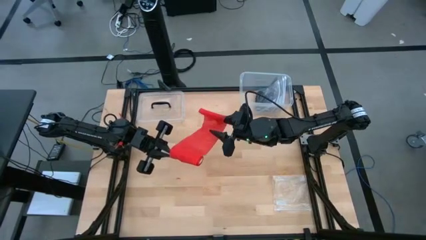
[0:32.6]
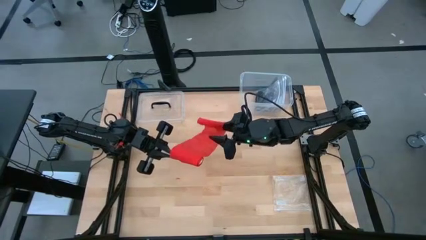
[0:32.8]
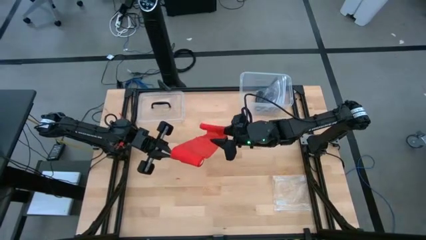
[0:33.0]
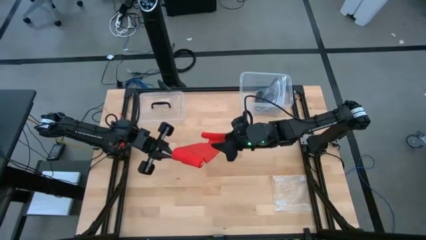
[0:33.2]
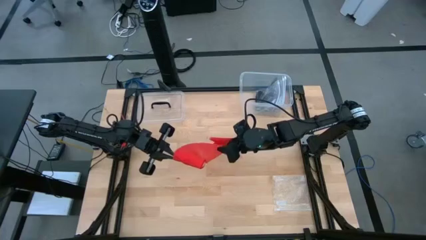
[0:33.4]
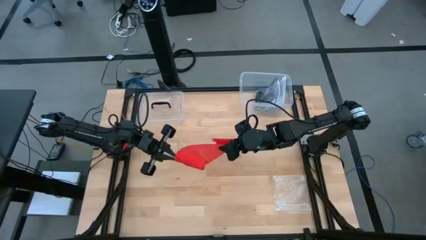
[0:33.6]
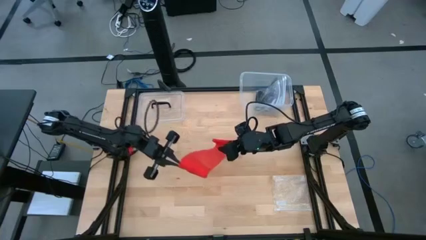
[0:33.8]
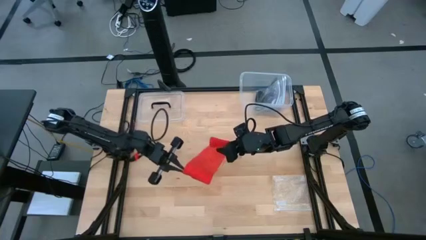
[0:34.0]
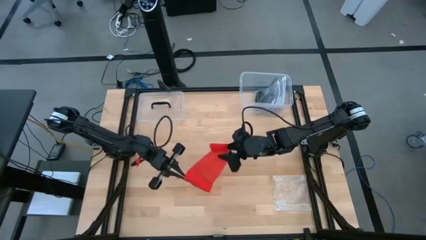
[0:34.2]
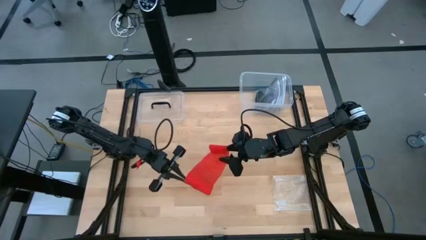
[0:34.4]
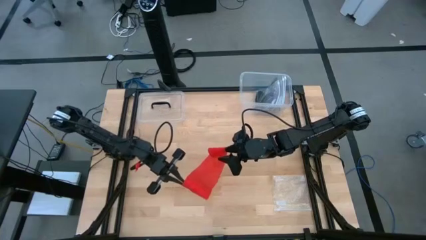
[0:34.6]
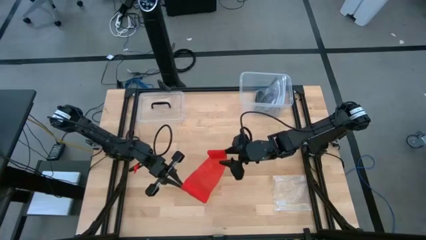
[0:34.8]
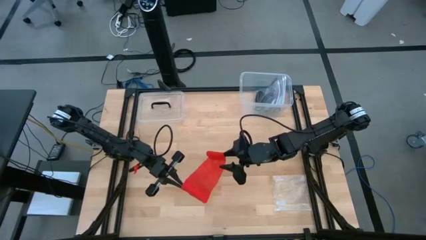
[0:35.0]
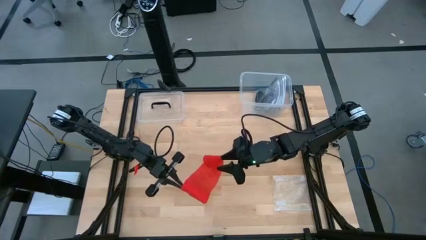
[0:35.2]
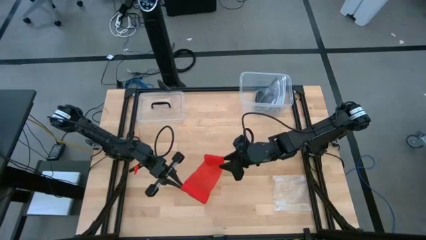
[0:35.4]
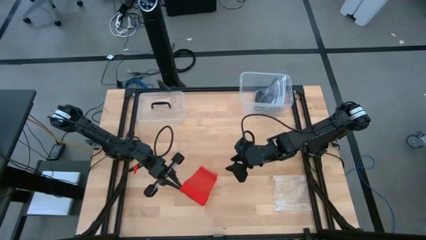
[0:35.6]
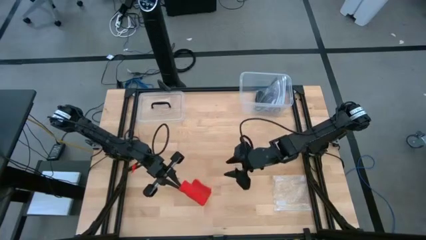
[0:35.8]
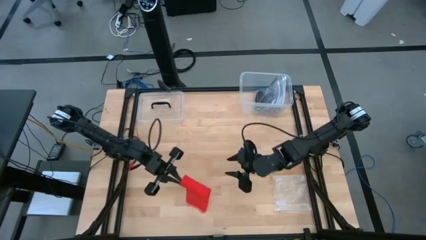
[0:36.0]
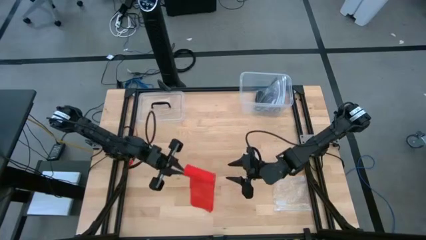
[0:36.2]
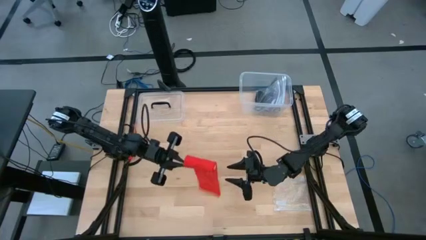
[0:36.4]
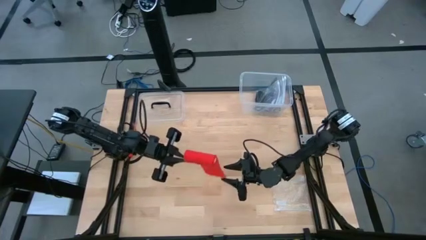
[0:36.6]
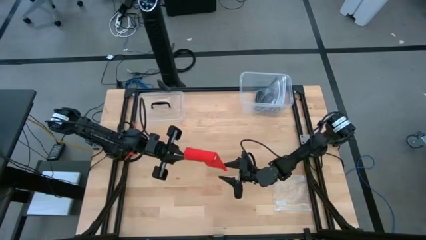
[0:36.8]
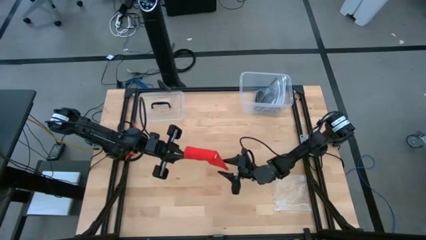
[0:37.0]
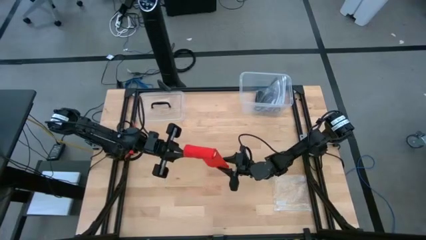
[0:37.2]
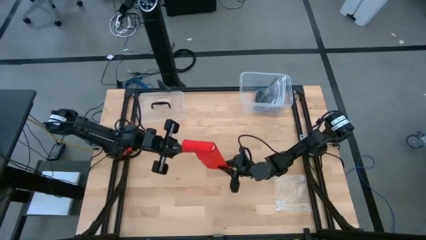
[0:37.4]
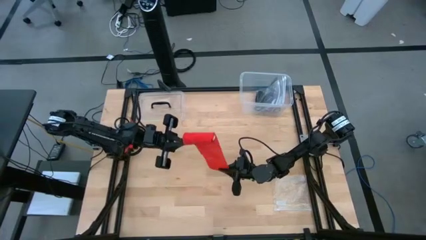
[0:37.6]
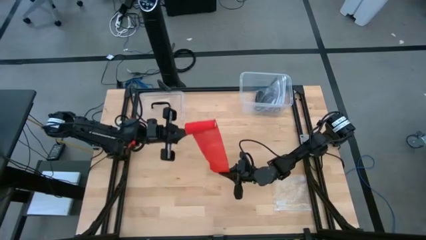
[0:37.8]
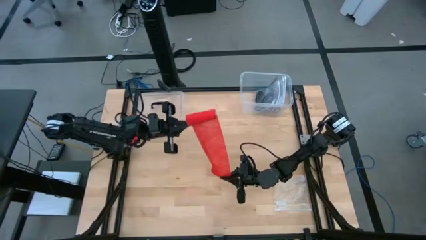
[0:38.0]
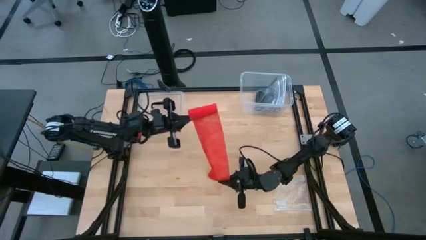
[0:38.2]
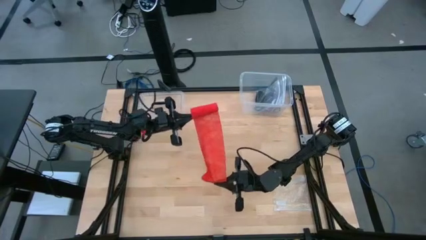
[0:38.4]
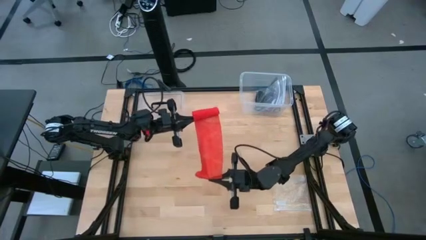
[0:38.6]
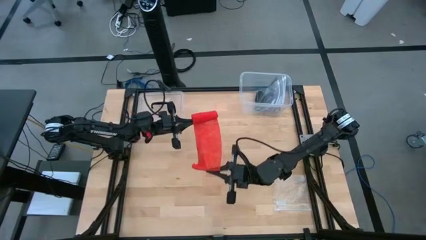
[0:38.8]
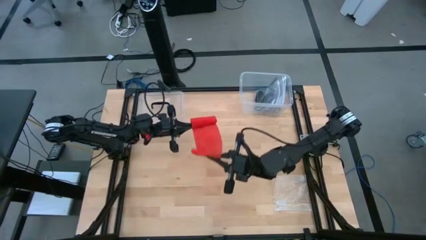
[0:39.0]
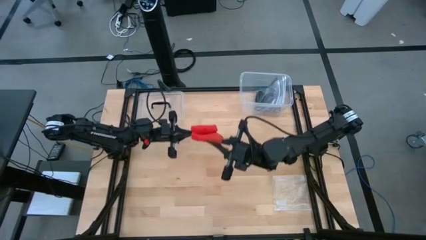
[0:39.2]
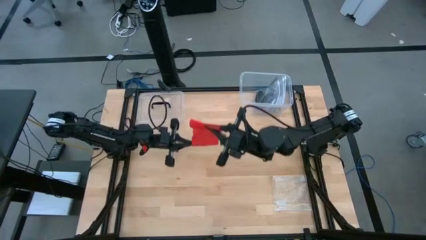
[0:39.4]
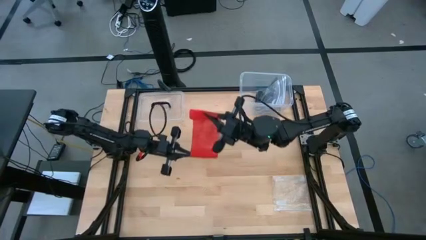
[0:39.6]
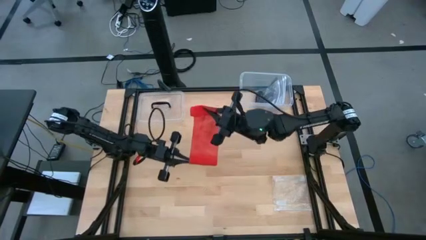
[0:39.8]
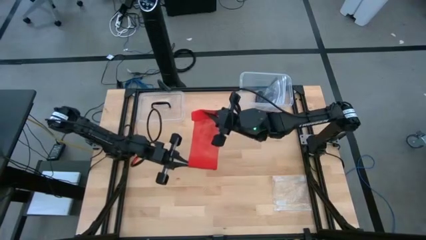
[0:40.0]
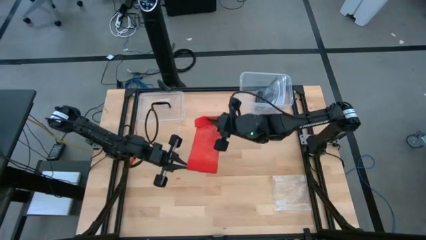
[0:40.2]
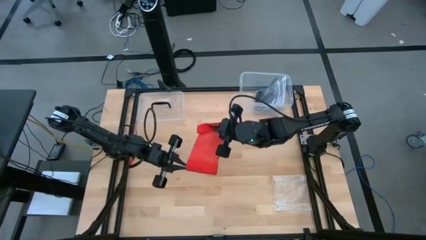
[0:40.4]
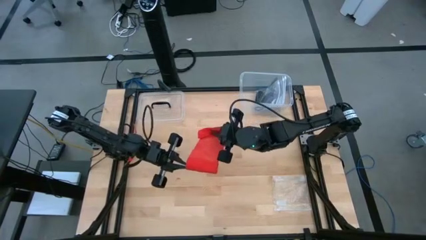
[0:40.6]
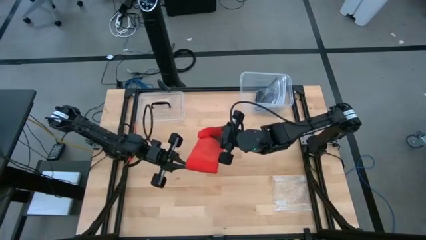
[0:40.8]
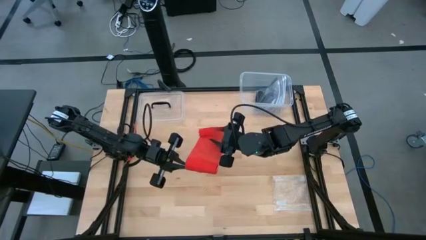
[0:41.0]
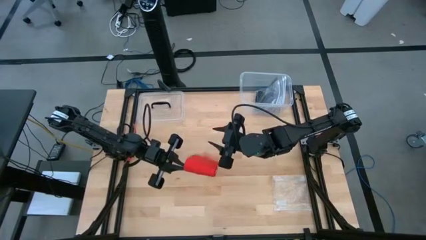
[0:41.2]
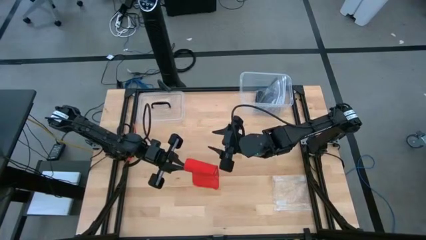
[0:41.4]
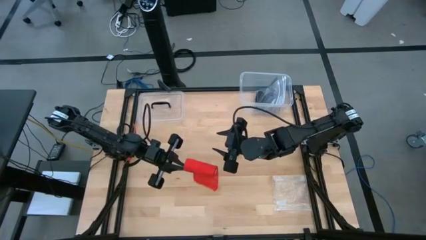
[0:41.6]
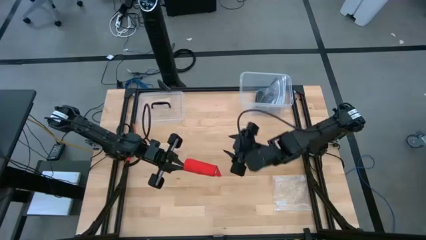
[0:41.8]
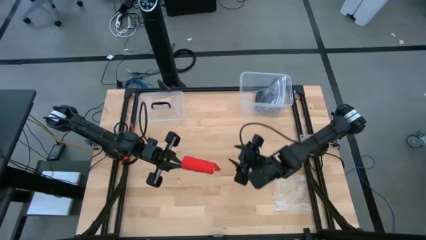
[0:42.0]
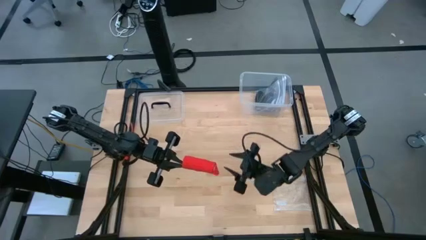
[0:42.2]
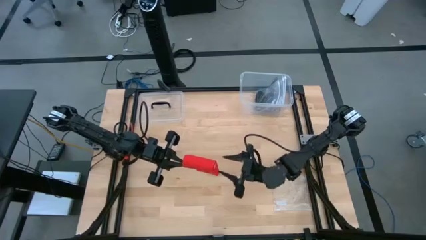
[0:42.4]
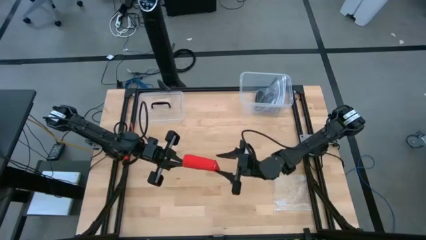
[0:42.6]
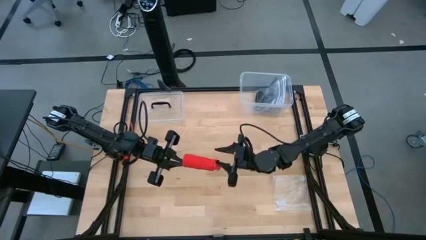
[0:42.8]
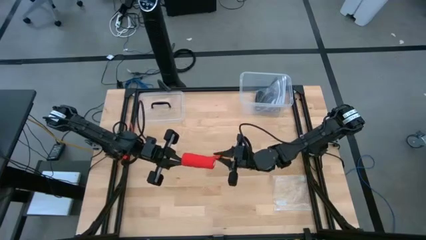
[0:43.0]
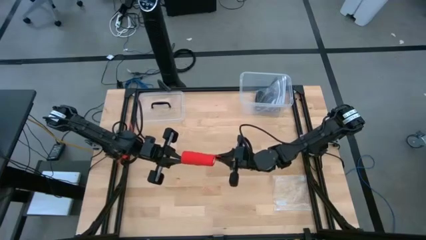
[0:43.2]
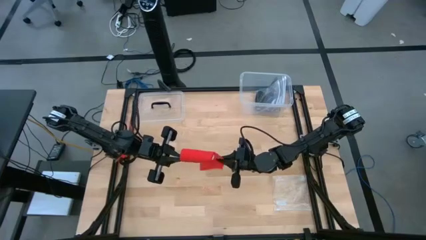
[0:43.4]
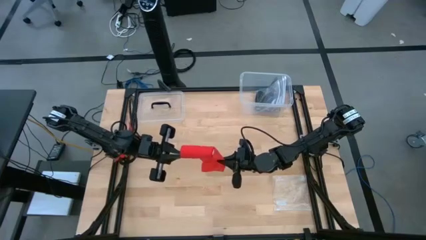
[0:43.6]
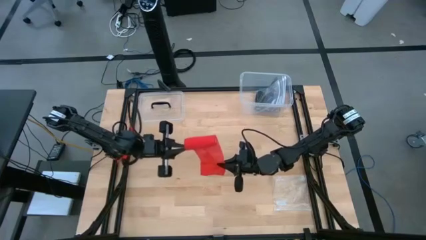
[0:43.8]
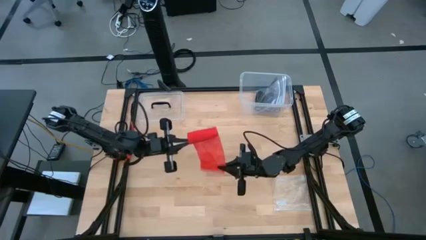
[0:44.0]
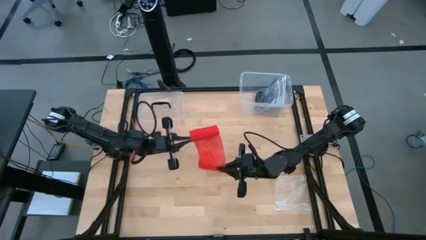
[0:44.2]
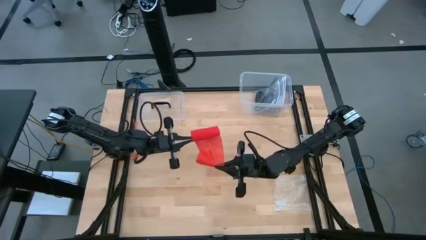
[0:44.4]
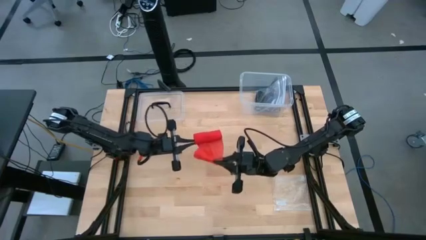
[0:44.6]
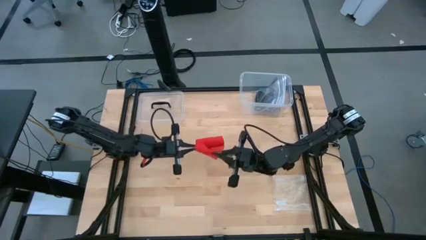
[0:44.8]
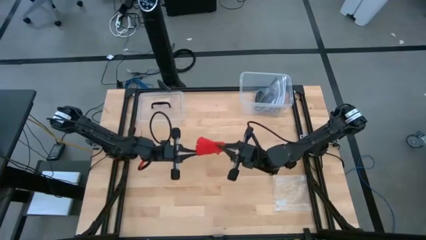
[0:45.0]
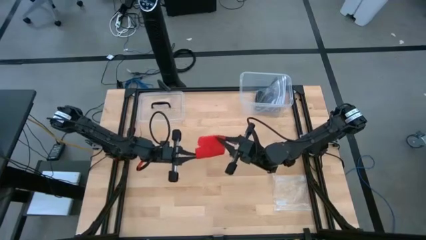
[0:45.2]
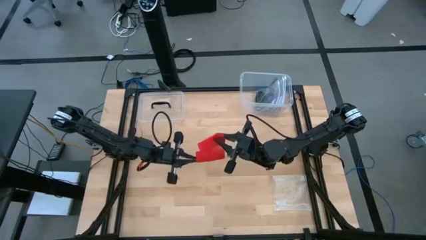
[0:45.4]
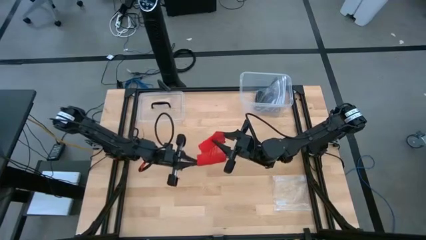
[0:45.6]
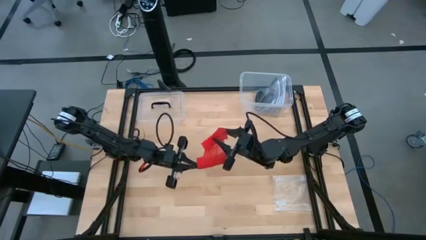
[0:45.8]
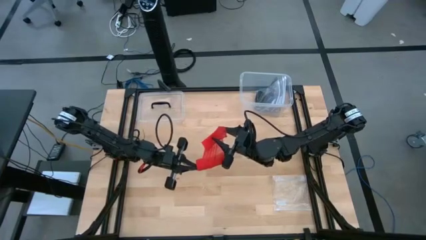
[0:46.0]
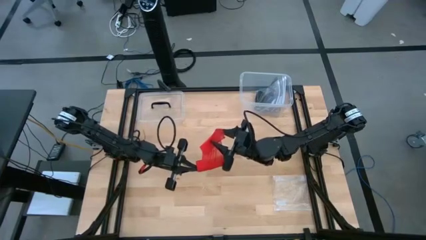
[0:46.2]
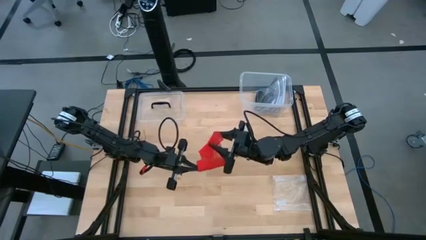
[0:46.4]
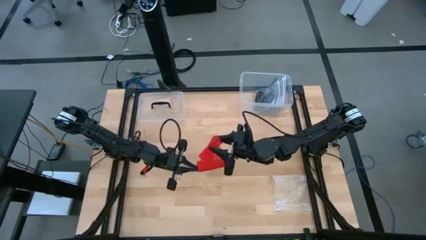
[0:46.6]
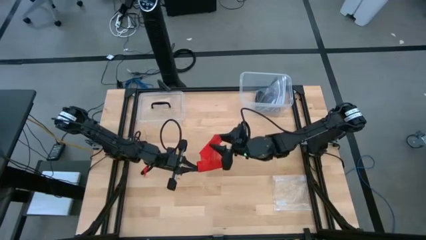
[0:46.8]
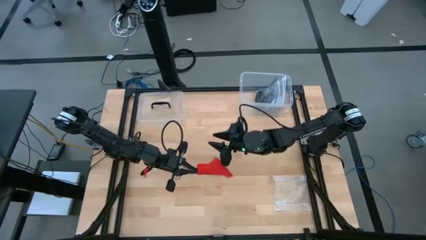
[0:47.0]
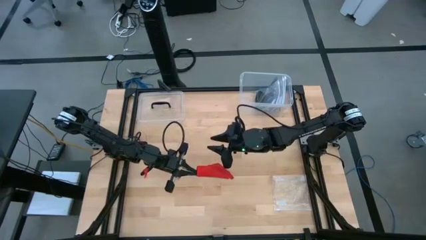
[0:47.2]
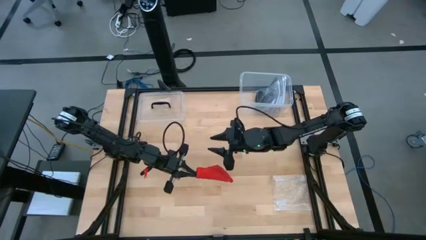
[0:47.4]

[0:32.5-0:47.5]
Task: Roll bandage
Roll the red bandage
